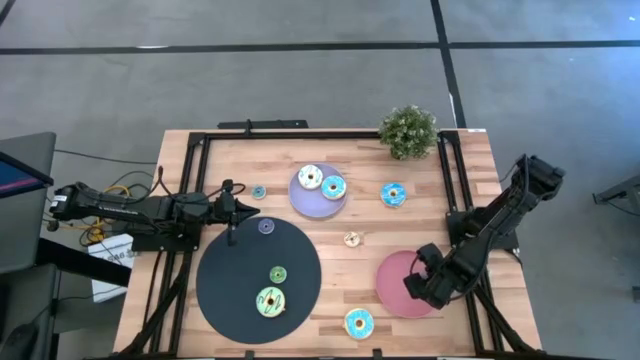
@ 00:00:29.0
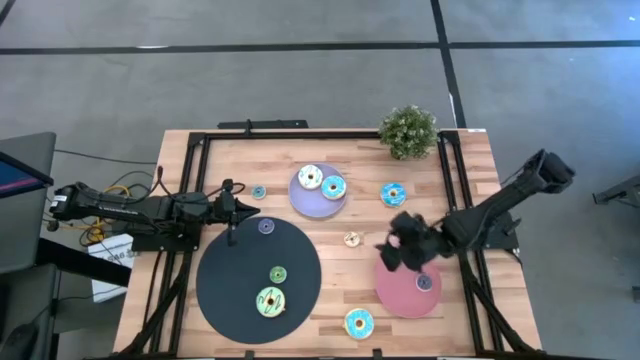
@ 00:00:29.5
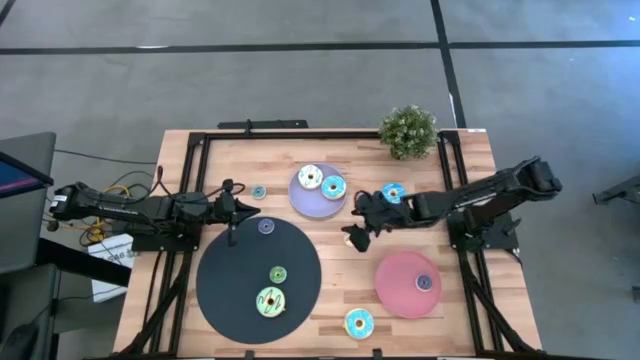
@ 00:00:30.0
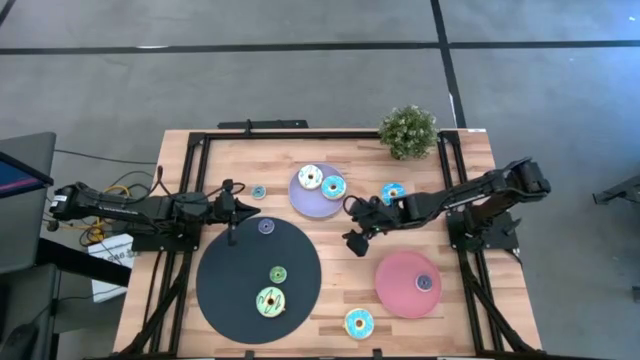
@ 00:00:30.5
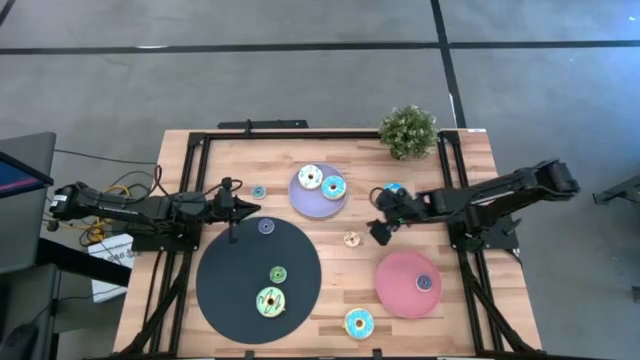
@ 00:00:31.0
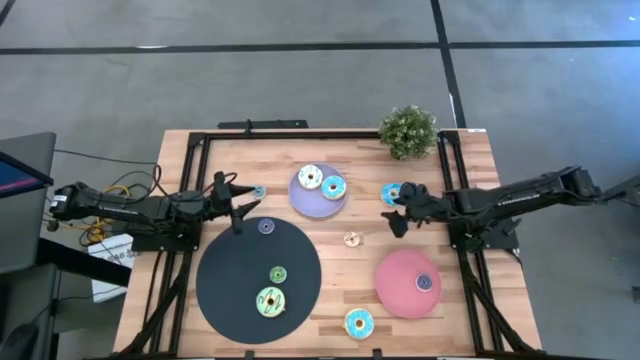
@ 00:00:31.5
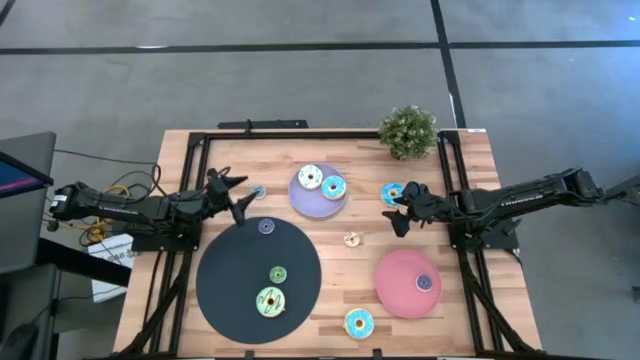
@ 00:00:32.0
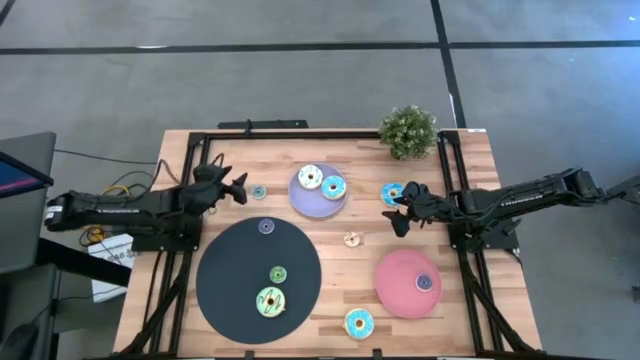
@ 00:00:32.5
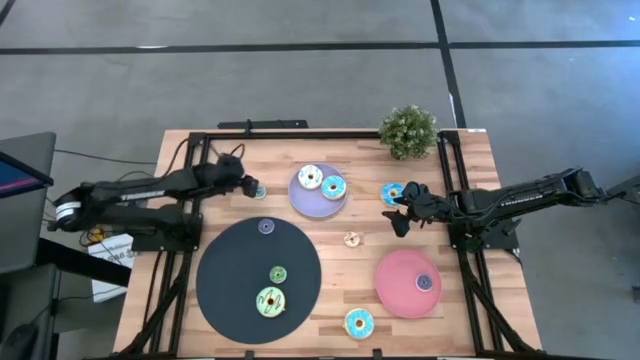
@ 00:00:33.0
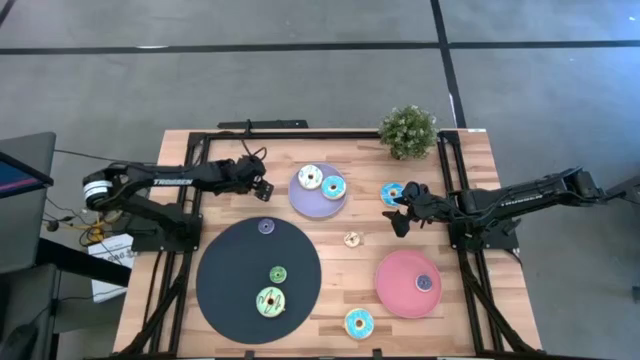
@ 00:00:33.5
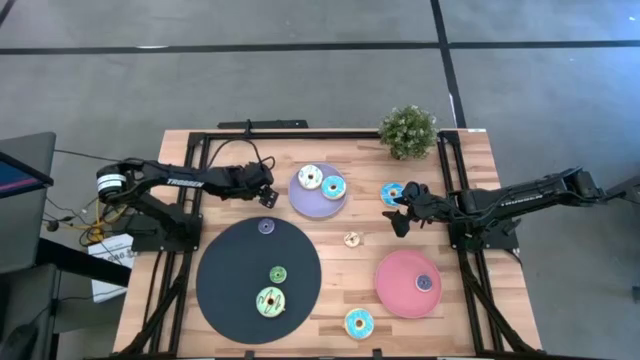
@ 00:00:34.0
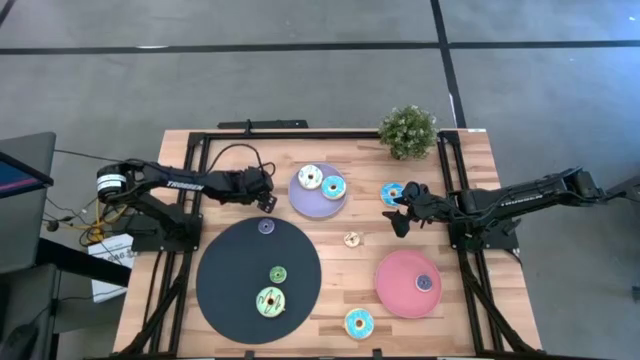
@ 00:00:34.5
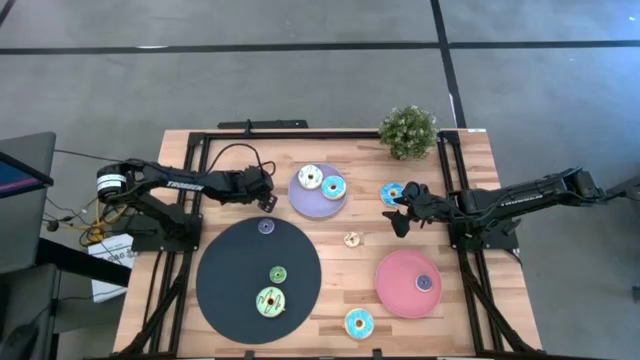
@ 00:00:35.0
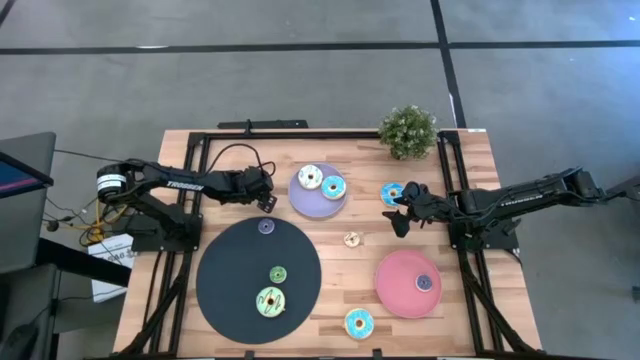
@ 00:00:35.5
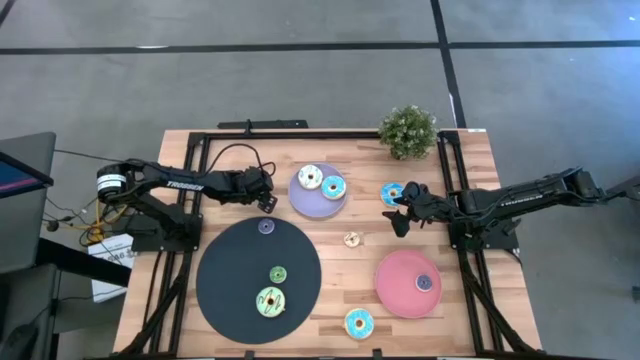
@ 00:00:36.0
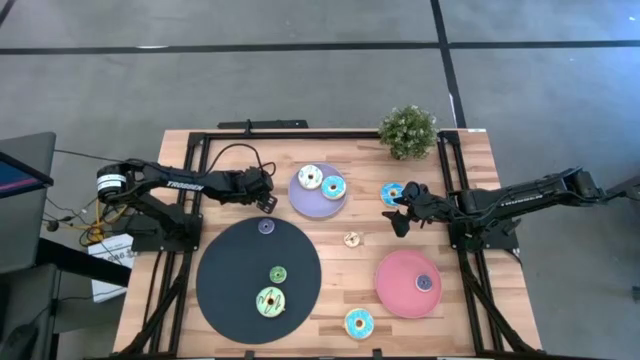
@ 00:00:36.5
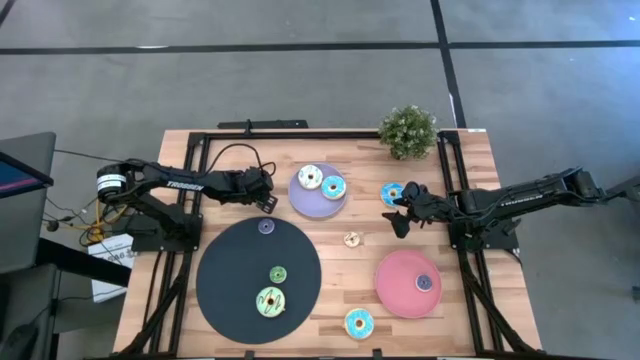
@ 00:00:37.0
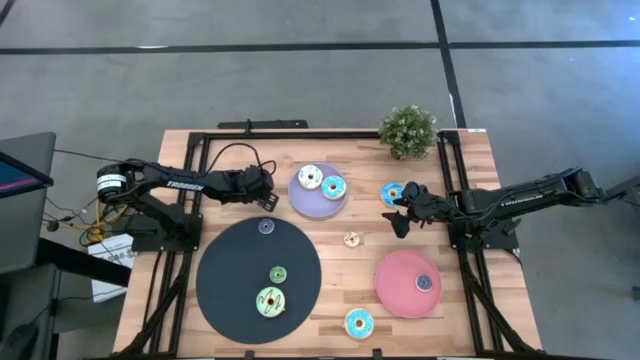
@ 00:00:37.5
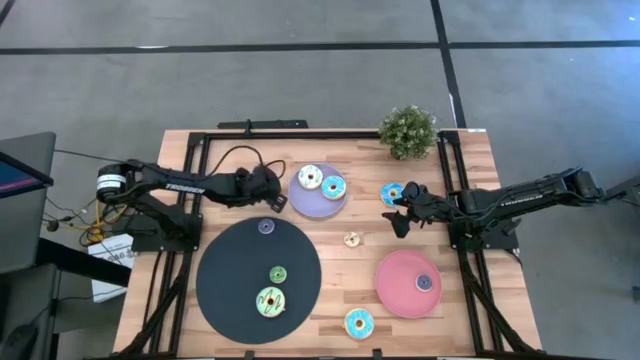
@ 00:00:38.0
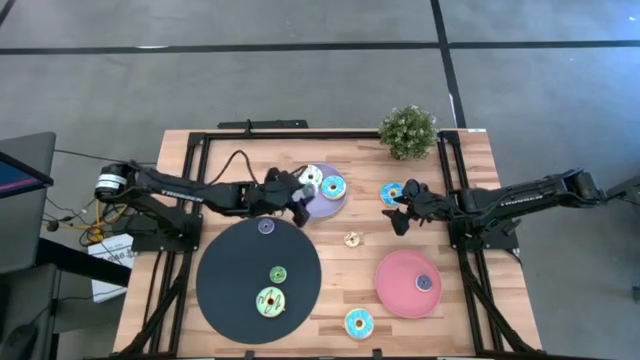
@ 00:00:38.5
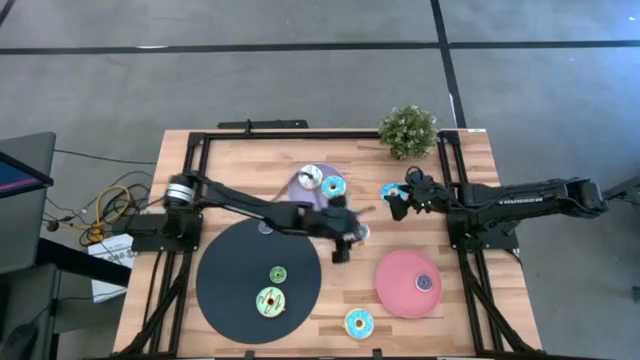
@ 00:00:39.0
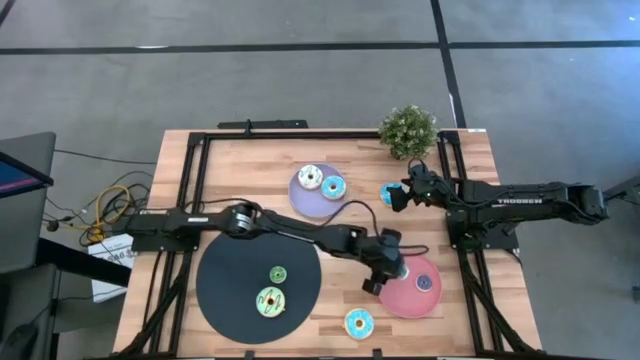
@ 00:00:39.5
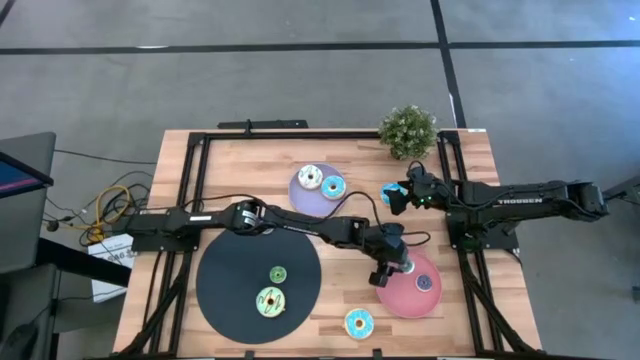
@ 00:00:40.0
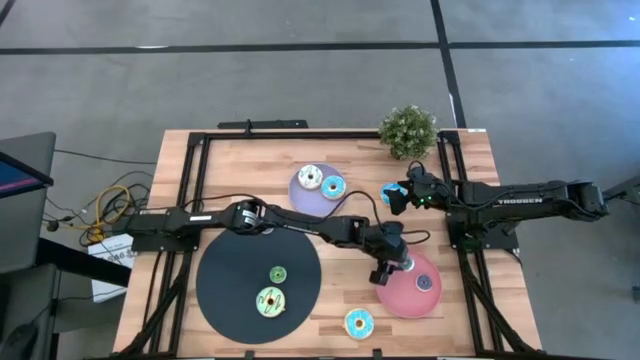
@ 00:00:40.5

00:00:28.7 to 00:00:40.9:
Task: Pick & Place donuts
Put the small light blue donut on the pink plate

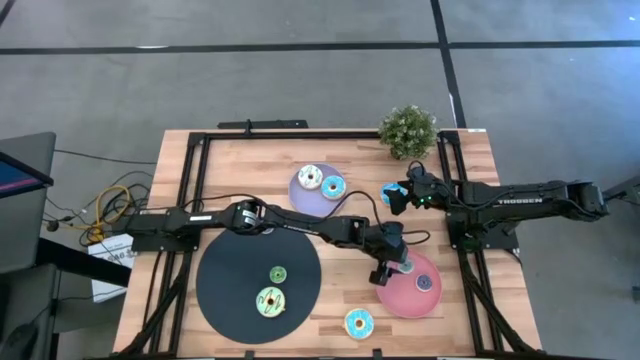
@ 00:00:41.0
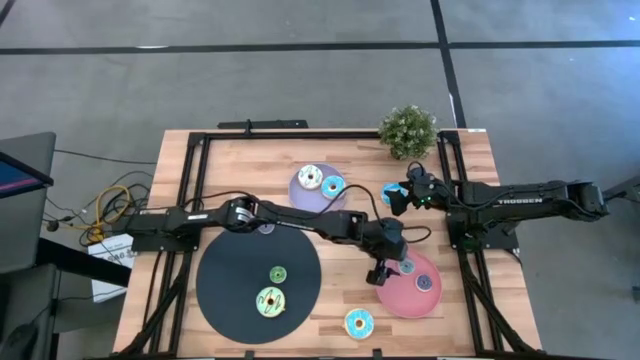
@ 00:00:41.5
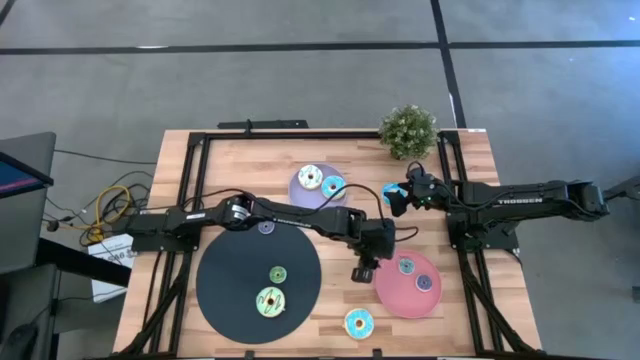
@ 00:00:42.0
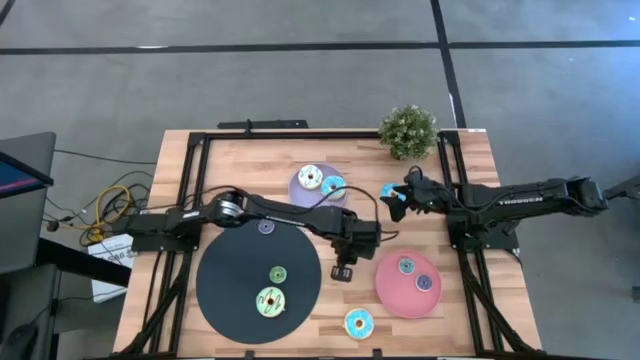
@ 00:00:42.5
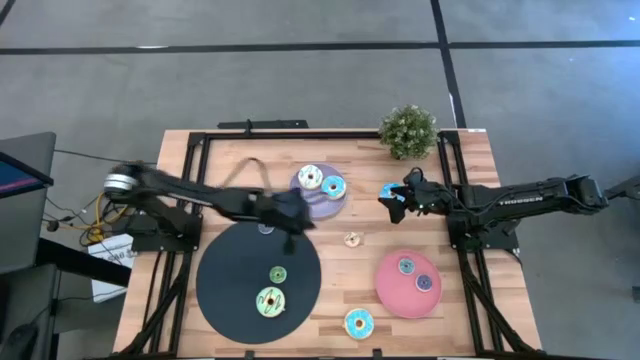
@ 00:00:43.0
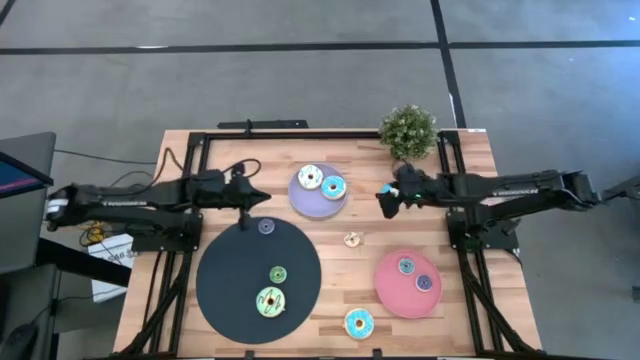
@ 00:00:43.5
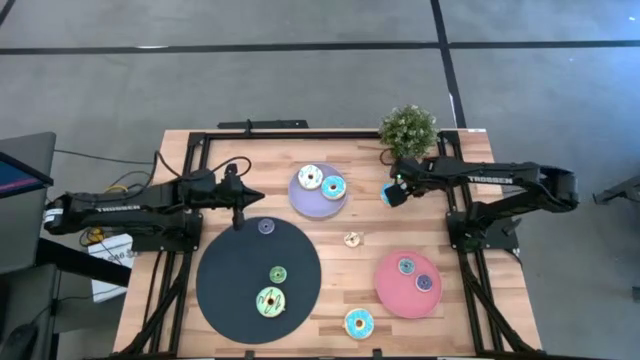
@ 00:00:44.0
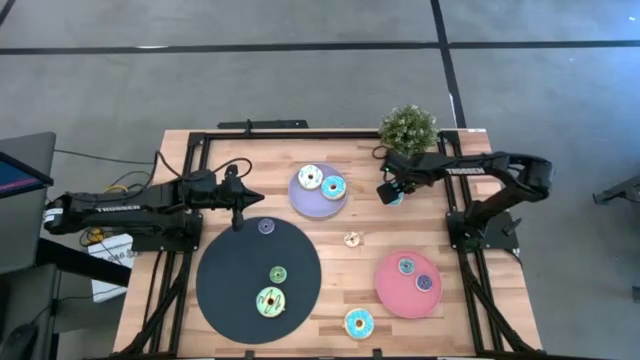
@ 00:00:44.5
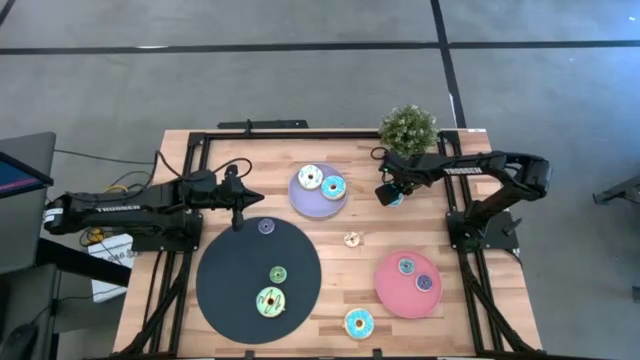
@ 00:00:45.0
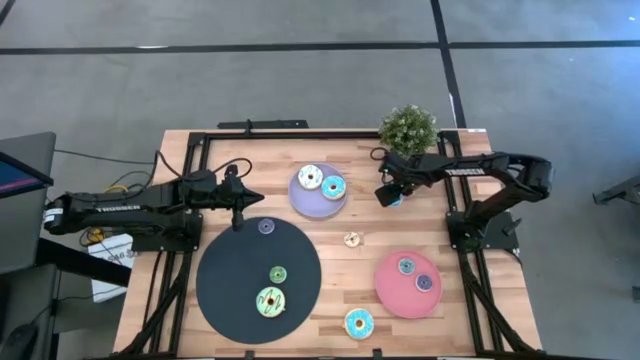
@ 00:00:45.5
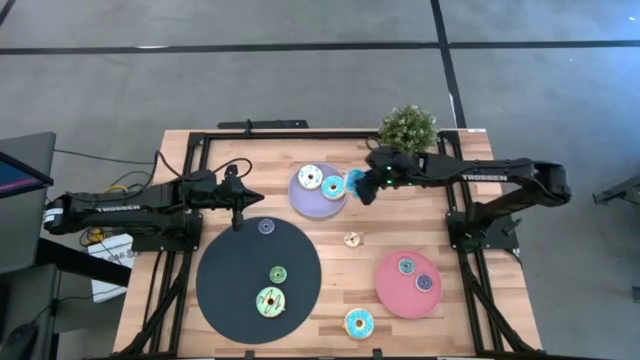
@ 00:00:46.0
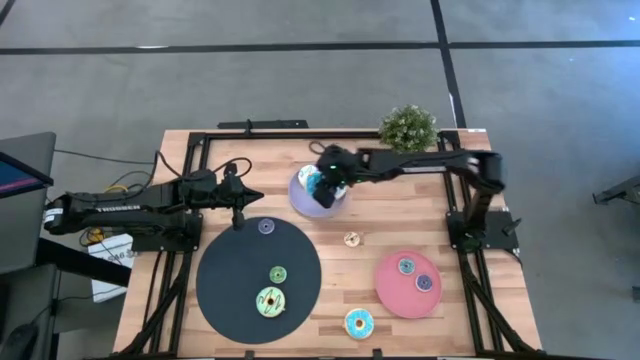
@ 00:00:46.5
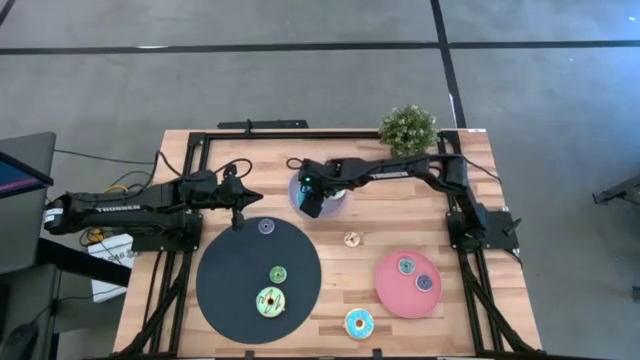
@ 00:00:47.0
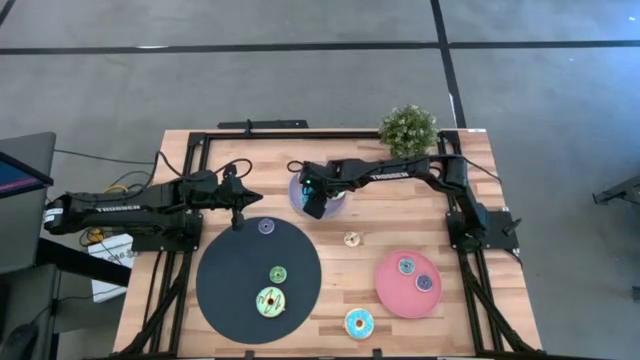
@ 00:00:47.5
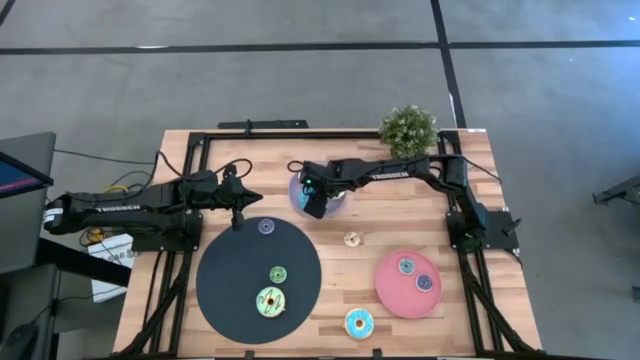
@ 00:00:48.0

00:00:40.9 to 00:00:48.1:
Put the large blue donut on the purple plate

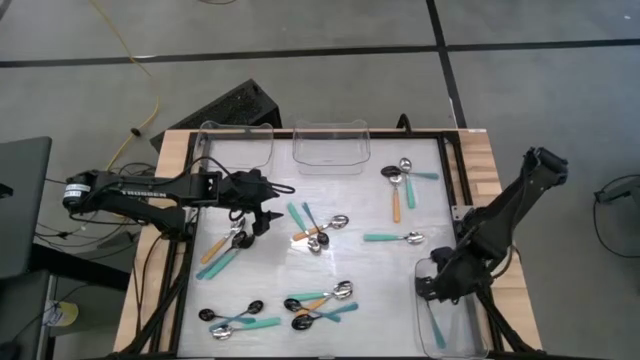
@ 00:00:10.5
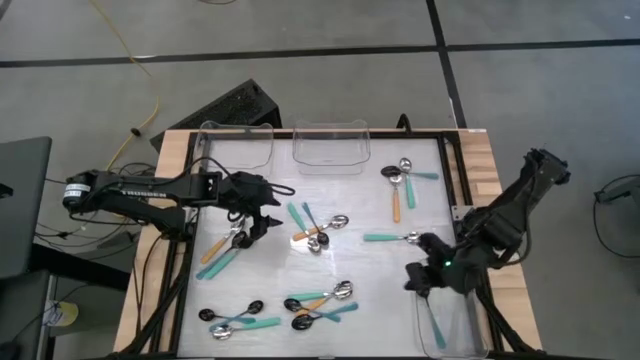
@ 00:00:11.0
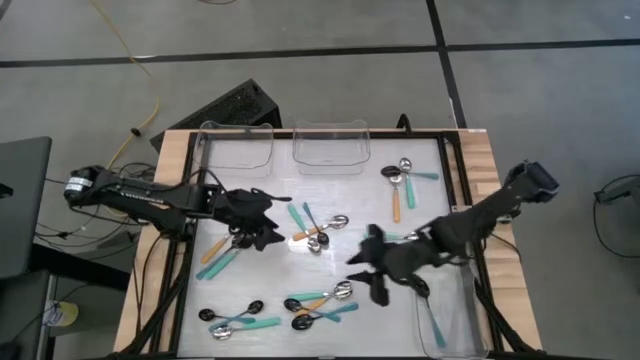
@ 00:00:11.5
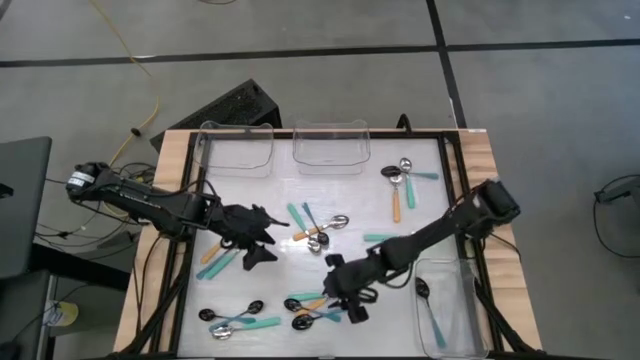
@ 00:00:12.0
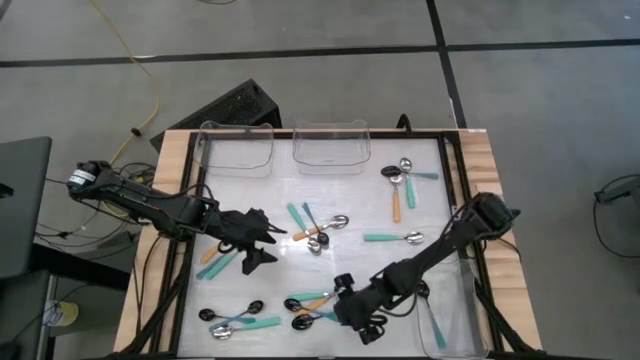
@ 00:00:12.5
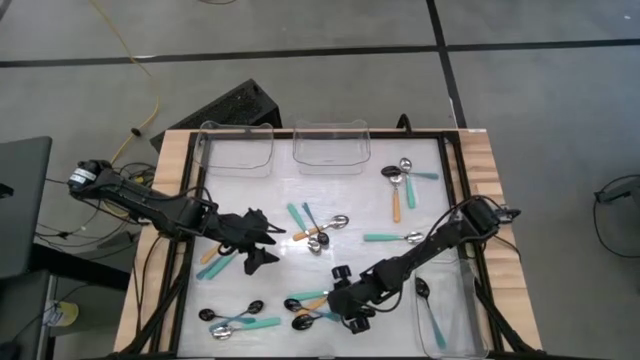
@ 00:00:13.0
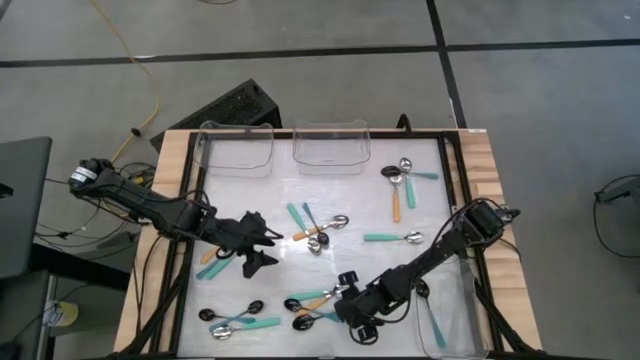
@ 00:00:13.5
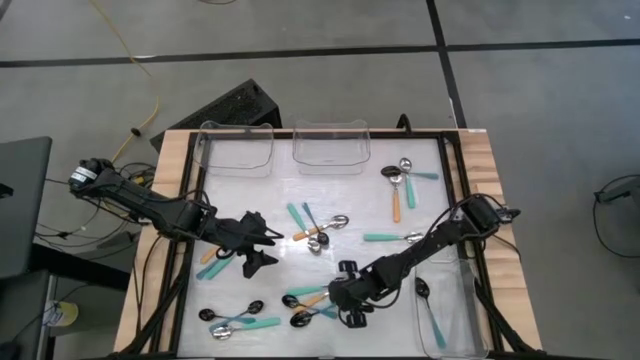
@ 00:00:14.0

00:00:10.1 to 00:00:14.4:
Task: Sort silverware by color (type)
Put the blue spoon into the bottom transparent bin
